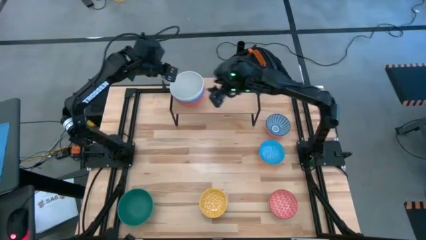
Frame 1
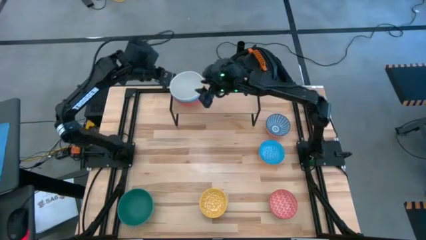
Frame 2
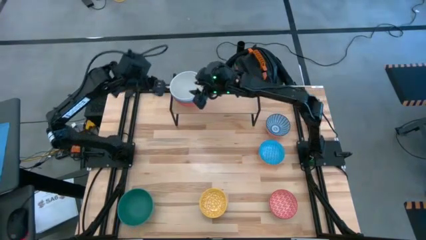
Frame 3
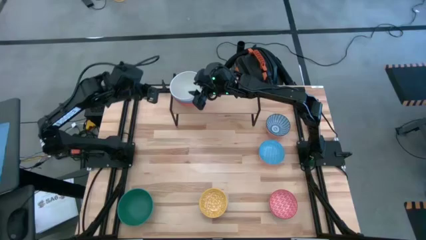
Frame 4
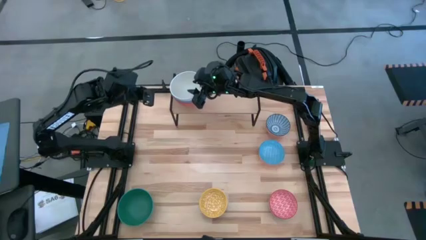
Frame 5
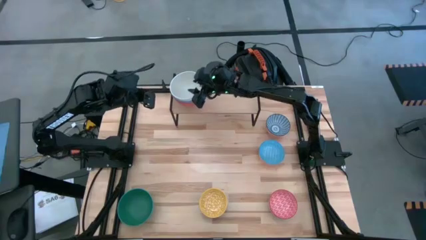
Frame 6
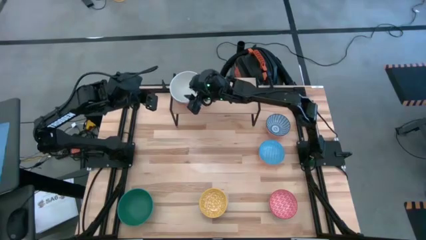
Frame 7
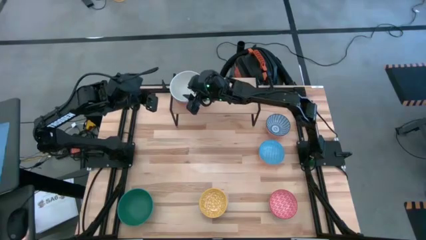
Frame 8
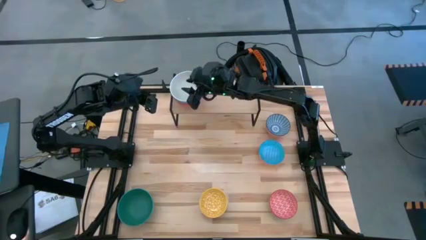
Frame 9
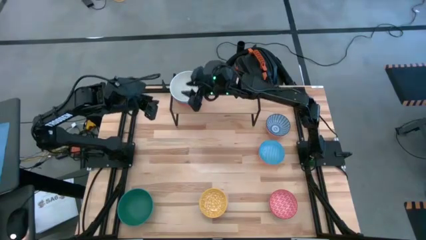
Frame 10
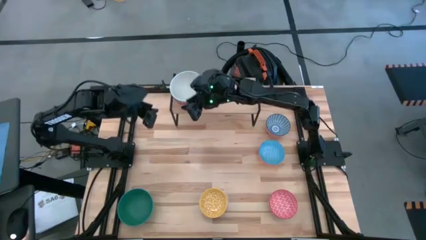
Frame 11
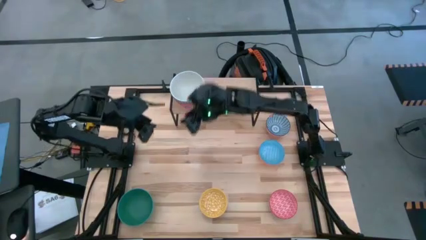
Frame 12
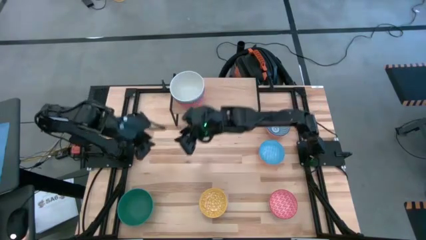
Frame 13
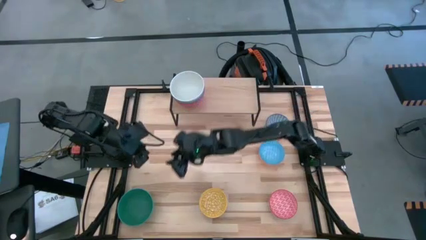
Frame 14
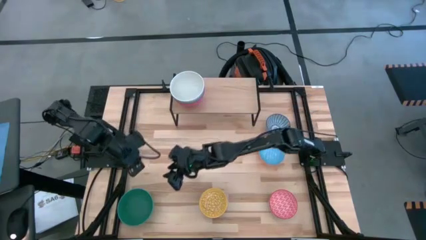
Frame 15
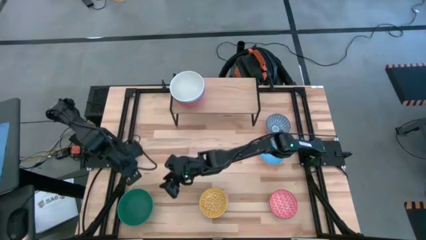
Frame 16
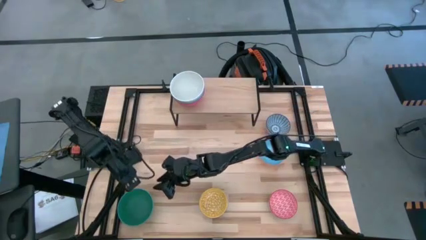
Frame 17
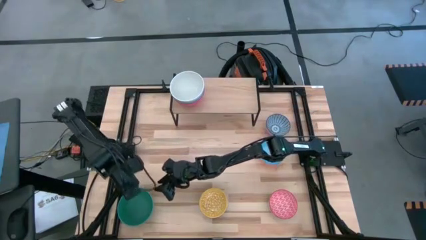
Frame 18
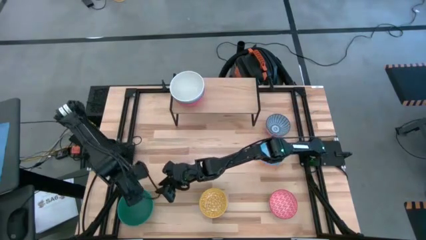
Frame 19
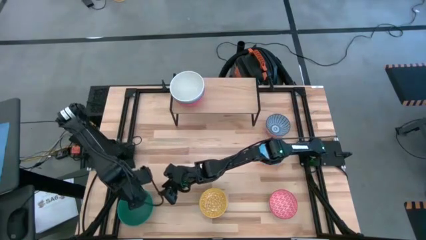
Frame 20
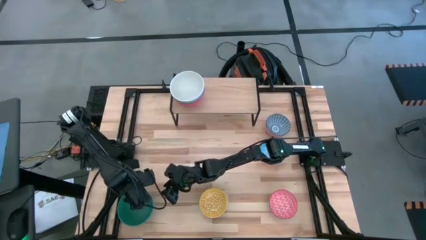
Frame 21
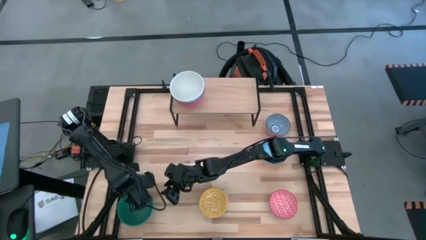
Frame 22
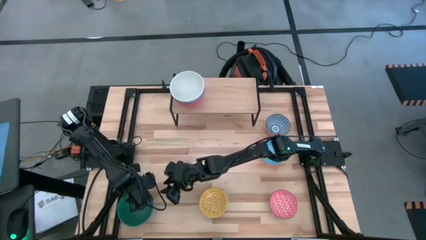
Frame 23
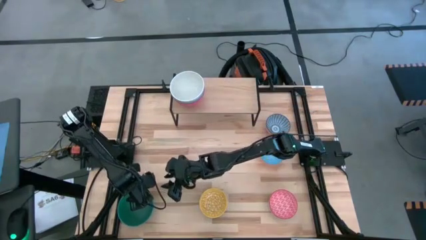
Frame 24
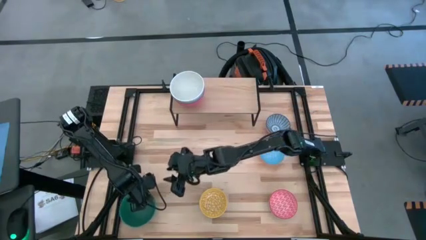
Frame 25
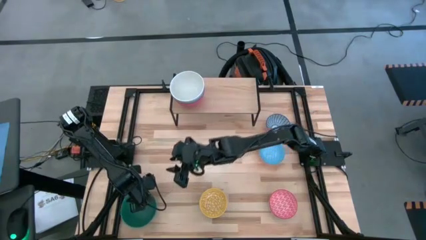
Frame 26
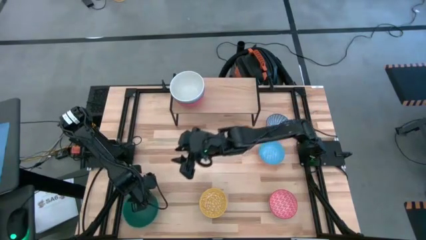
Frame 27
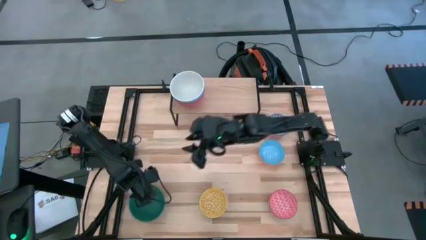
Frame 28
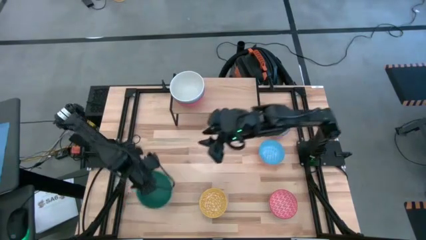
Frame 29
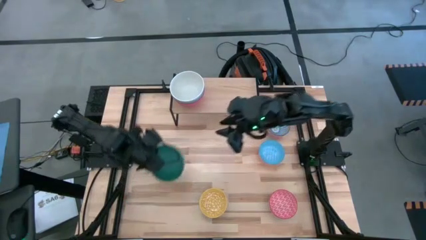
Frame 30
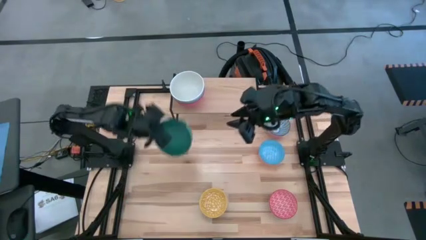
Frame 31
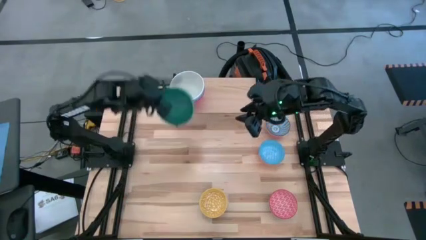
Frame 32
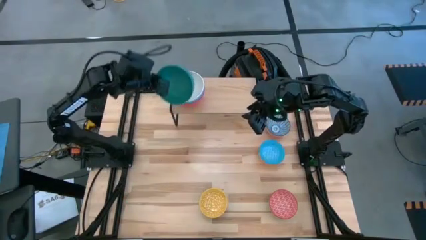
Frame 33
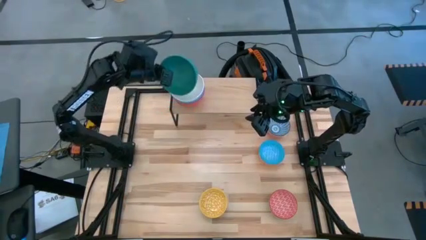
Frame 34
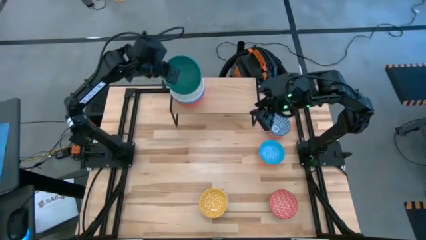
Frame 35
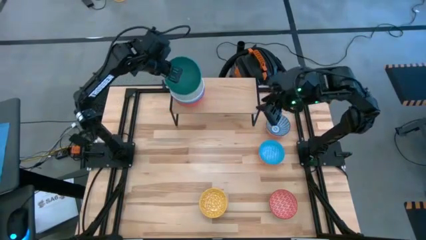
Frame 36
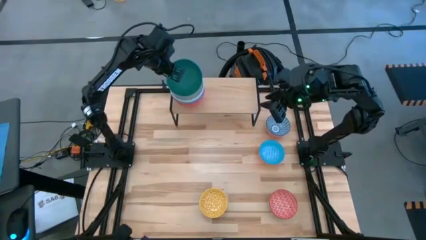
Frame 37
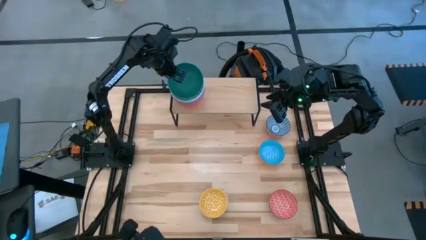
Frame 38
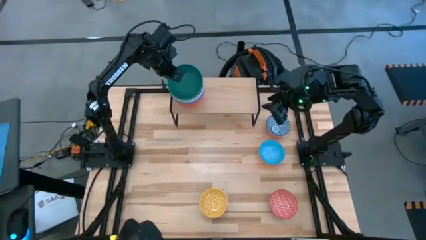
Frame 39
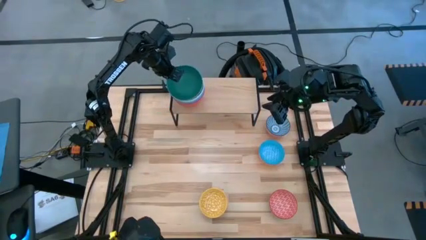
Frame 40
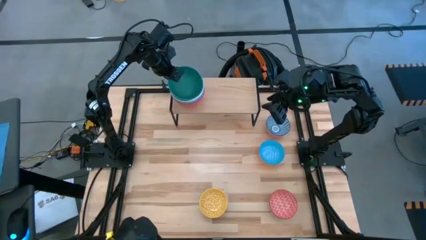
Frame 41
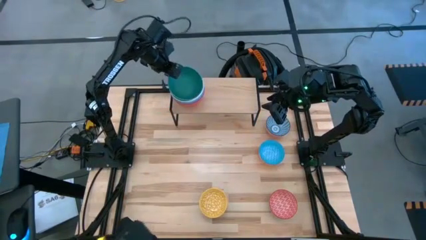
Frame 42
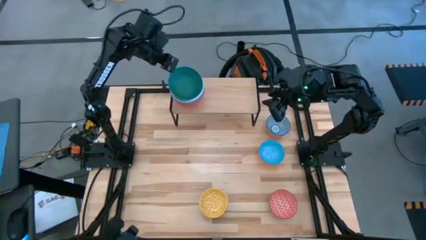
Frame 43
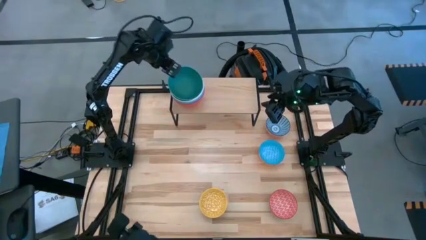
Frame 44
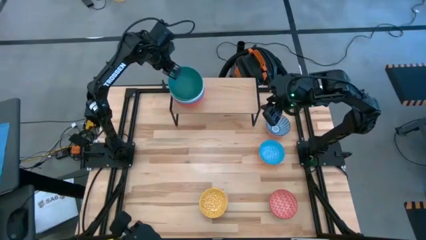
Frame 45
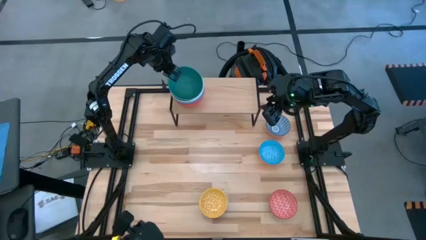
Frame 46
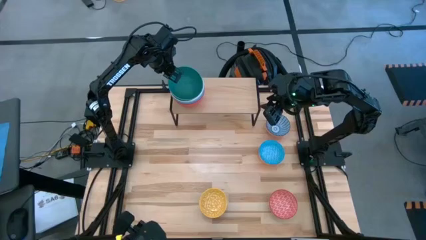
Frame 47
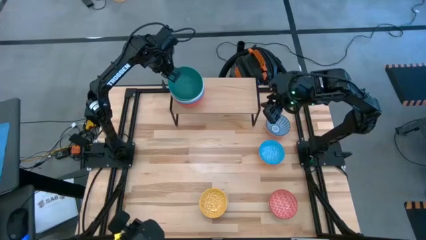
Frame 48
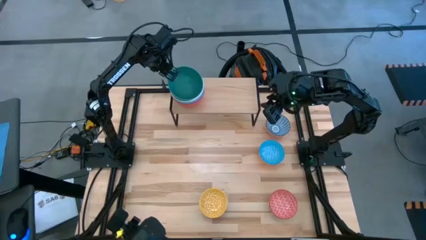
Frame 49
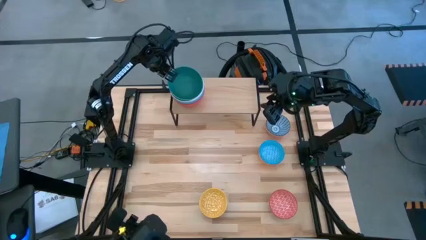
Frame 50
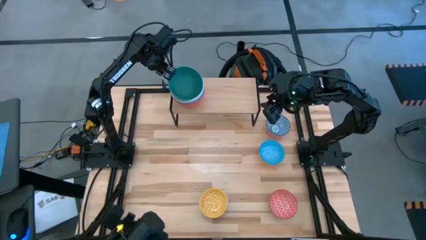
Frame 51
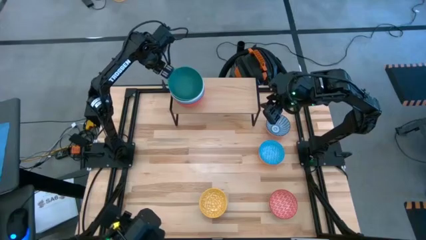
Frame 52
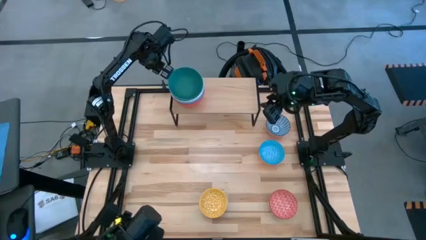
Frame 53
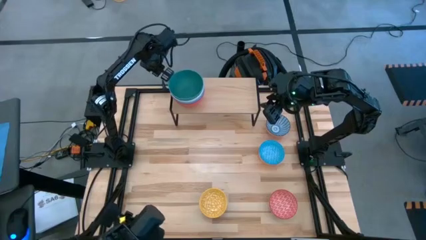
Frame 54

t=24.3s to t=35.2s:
Task: Place and stack bowls onto a shelf
Stack the green bowl on top of the white bowl on the shelf

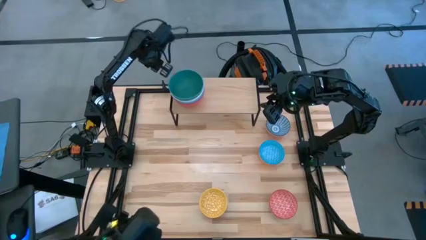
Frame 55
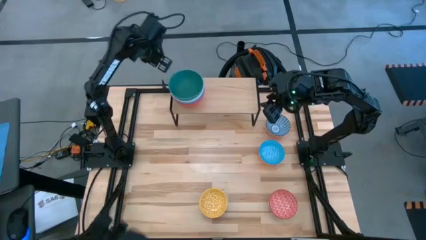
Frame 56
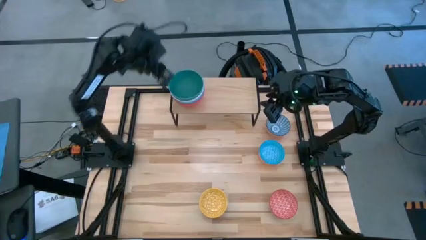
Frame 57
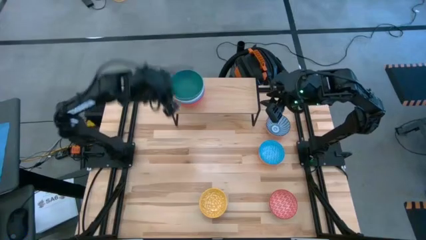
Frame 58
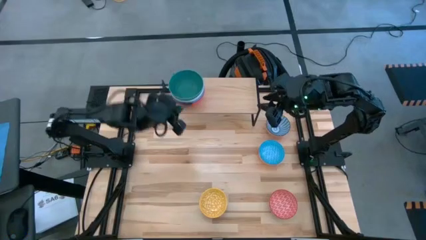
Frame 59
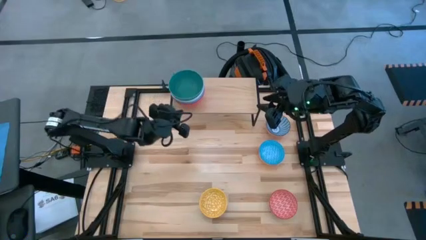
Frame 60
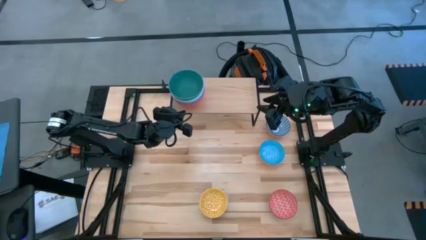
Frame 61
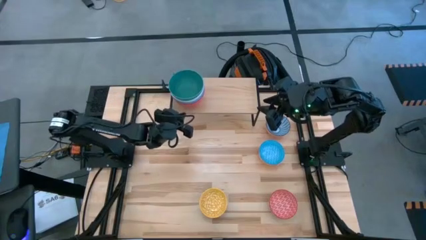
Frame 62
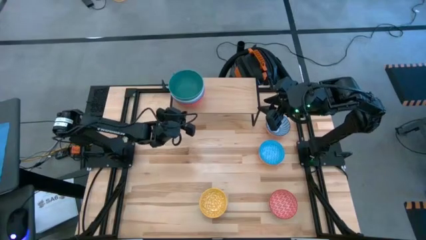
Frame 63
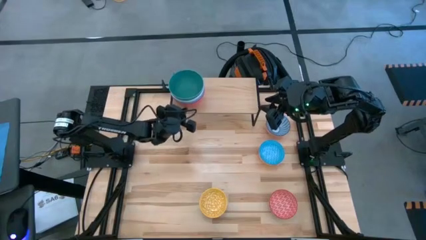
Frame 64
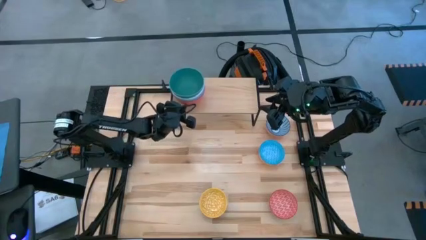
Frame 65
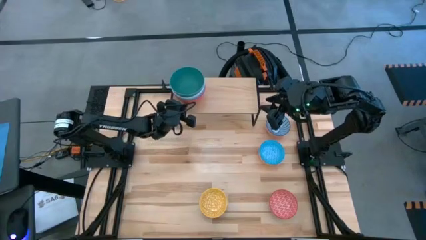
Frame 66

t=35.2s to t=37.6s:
Adjust the stack of bowls on the shelf

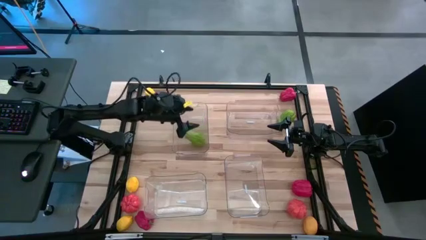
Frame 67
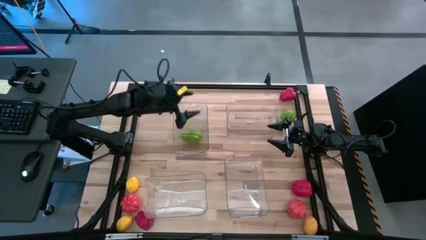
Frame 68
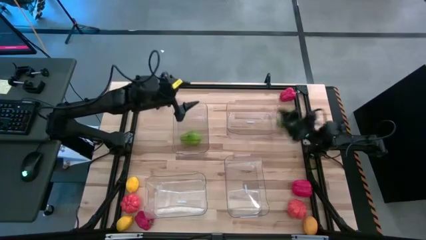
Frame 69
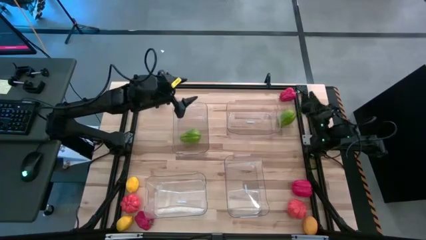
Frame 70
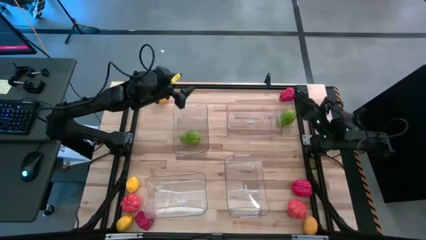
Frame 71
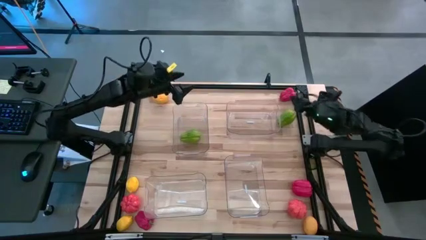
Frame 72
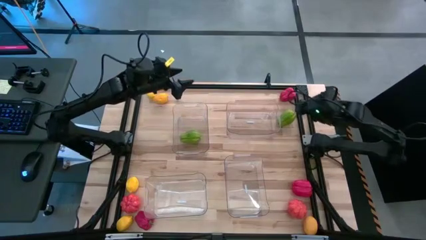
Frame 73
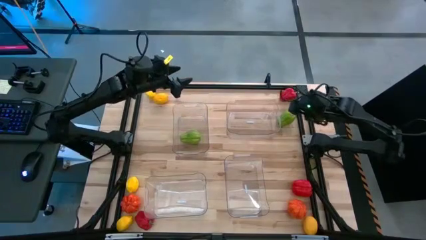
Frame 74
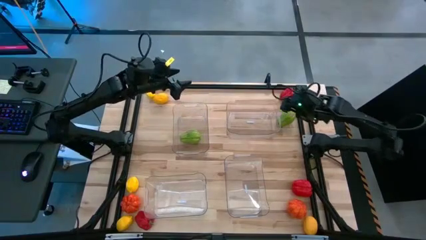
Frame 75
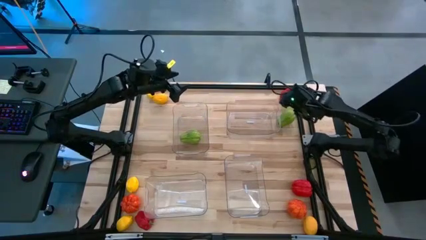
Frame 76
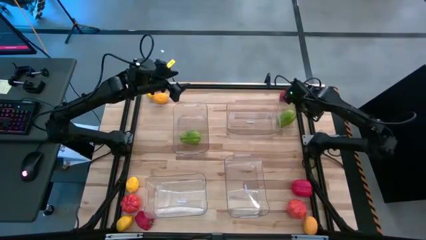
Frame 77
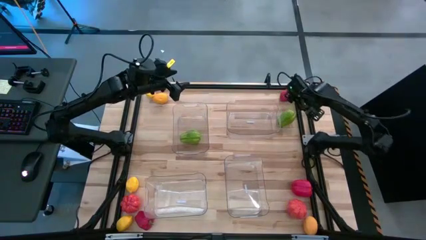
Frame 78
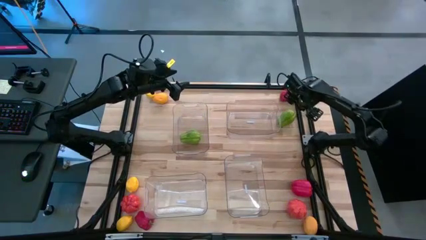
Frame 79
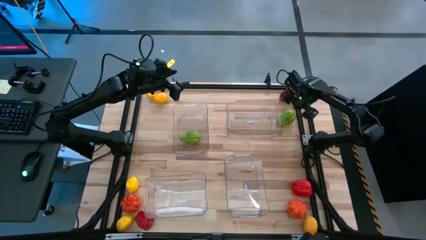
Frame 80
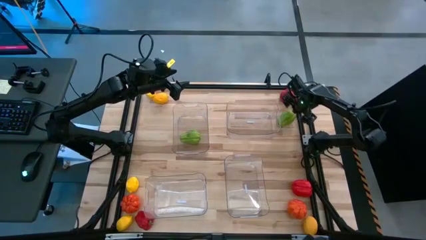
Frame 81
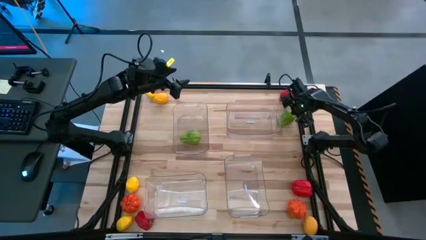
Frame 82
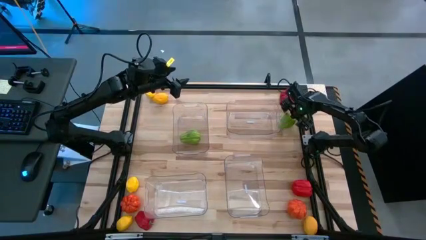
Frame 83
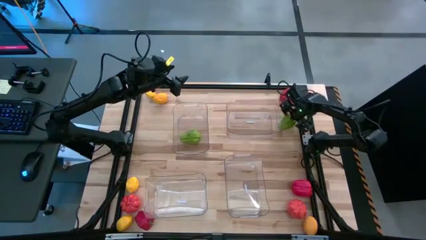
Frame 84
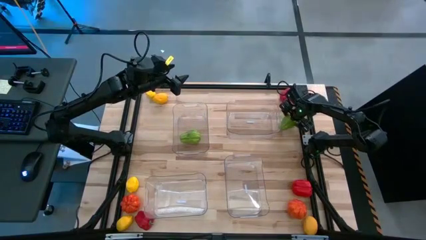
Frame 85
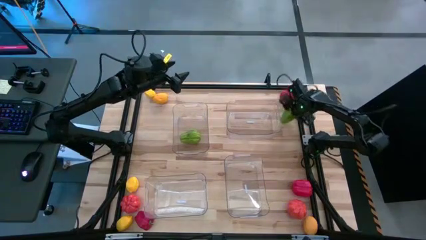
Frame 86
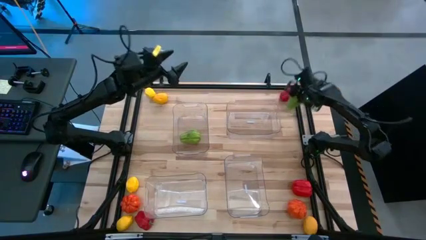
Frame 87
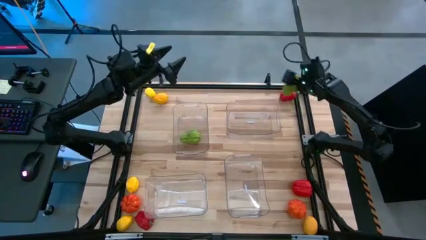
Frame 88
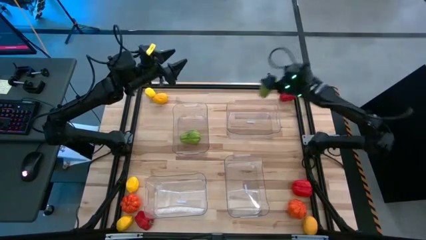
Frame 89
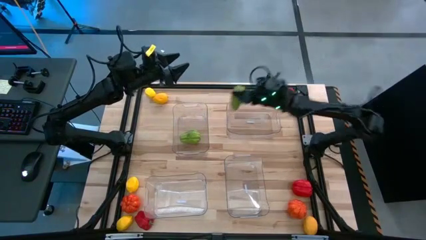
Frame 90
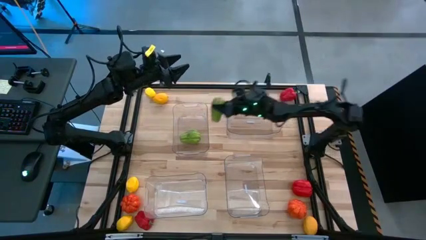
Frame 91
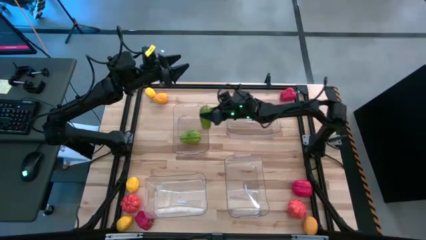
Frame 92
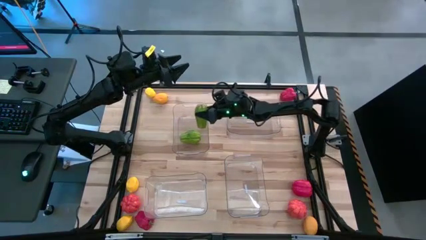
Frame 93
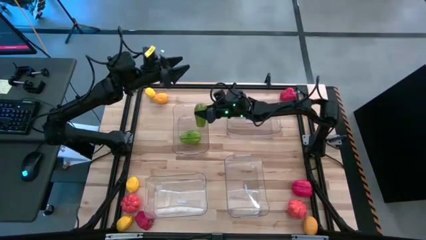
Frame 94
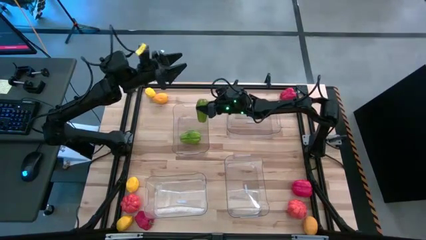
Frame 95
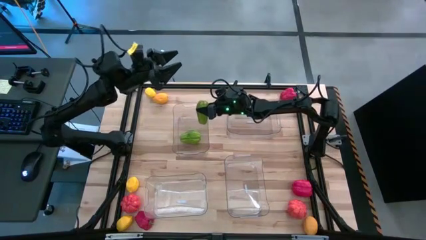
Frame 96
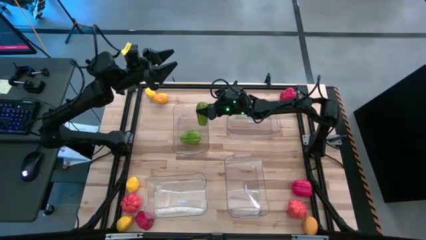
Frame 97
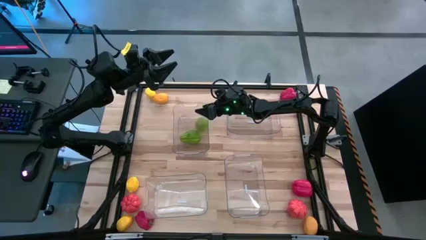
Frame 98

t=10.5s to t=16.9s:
Task: Sort produce into baskets
Put the green chayote into the top left transparent bin
